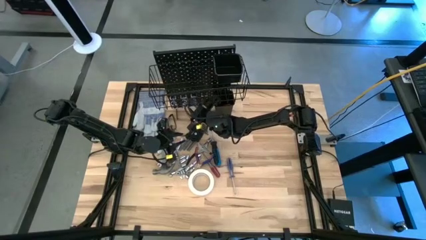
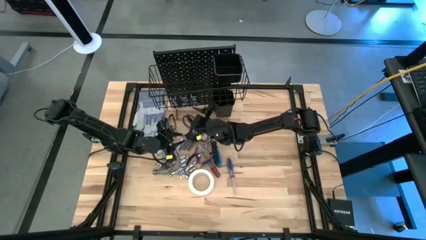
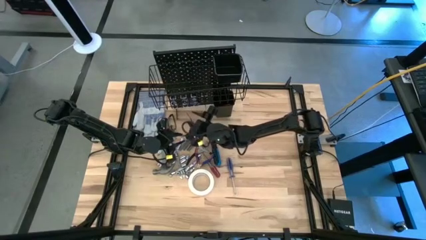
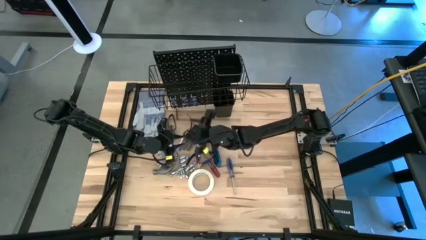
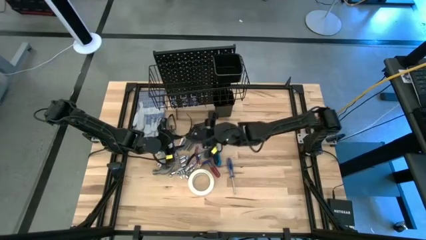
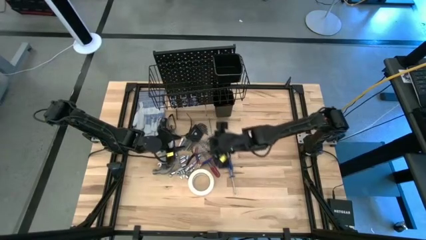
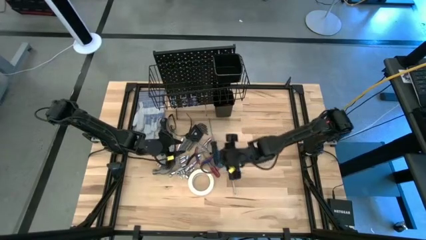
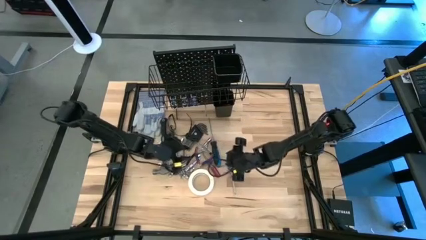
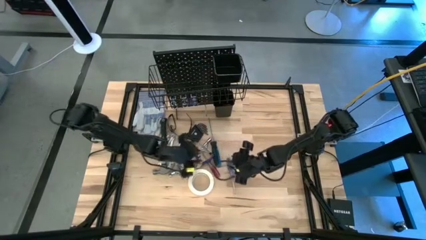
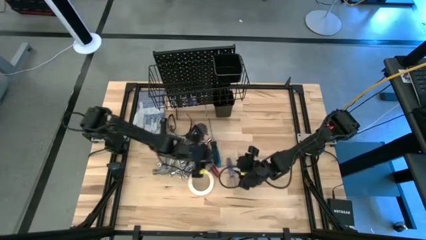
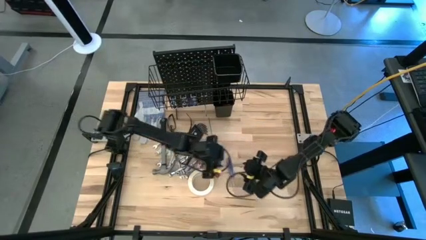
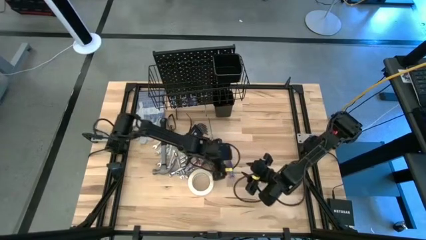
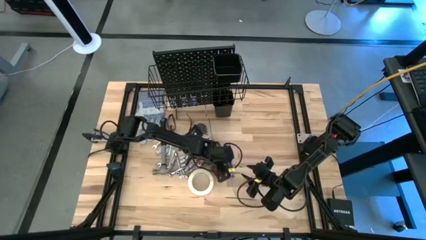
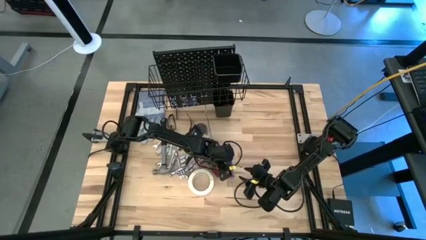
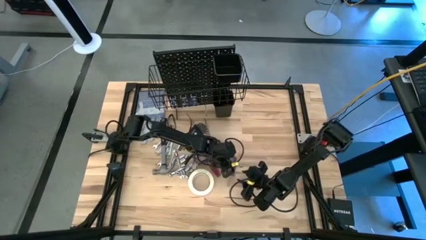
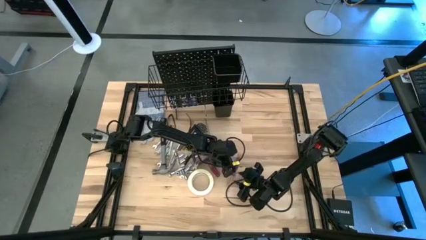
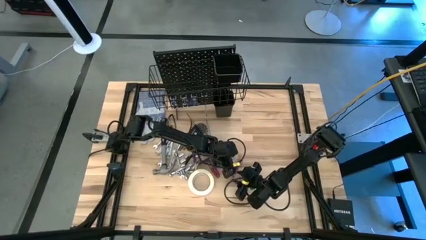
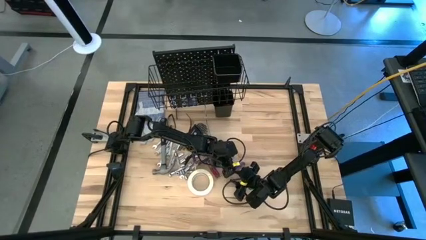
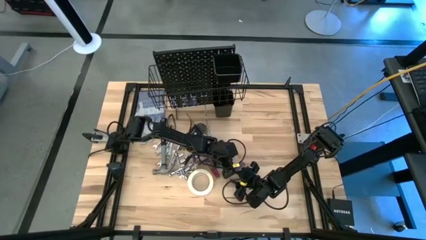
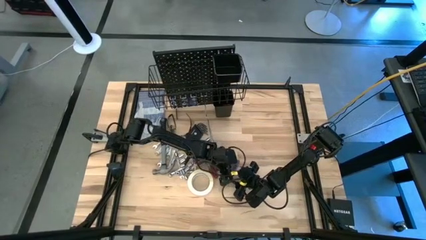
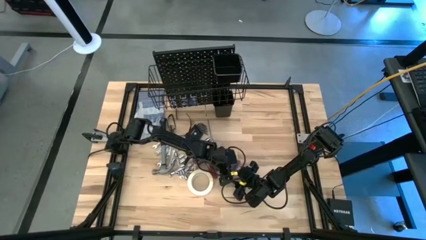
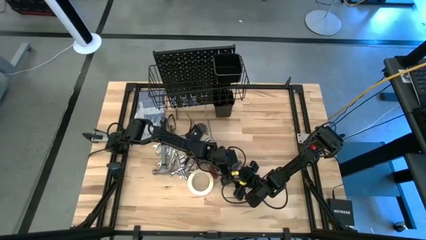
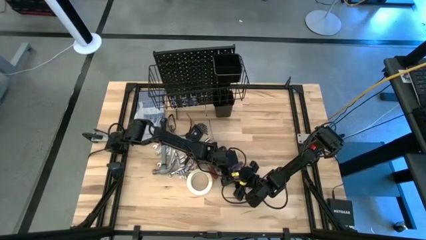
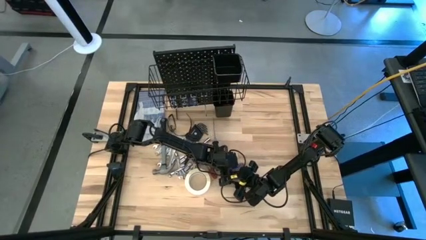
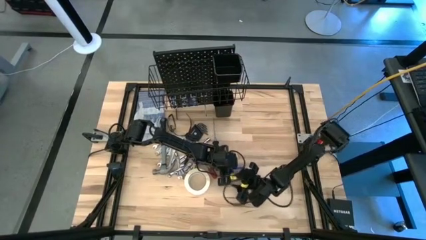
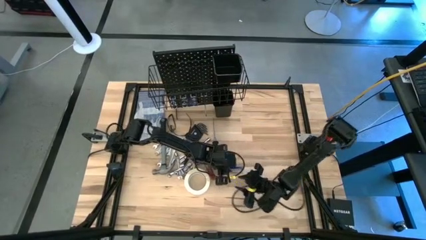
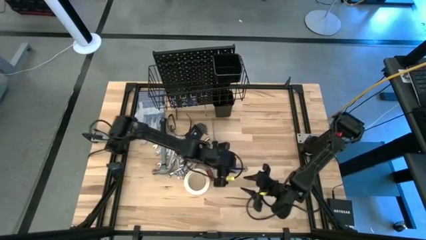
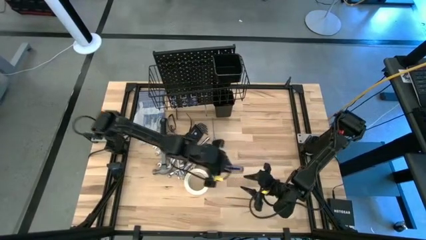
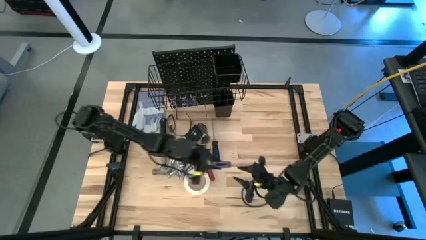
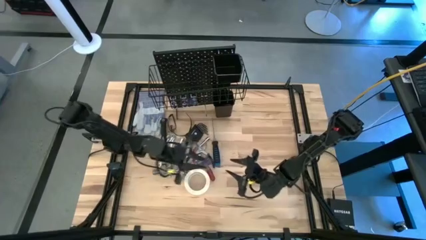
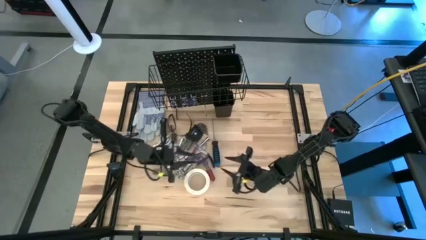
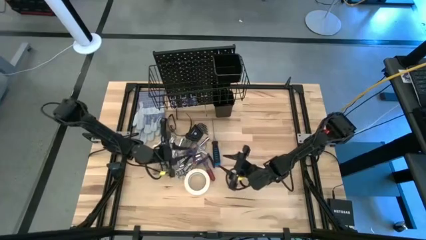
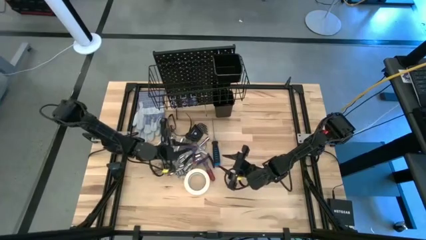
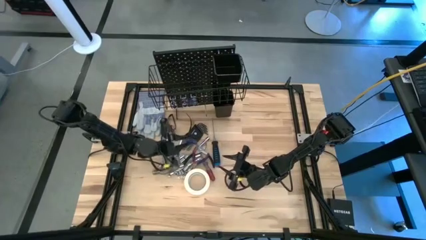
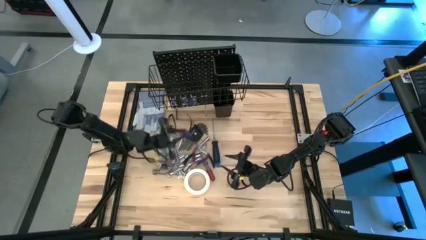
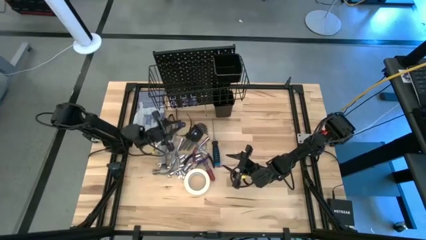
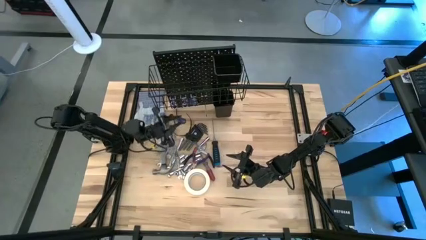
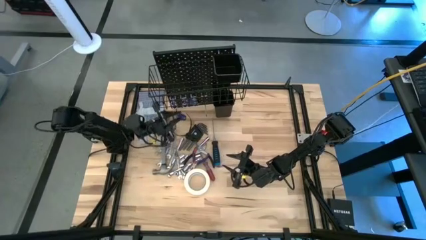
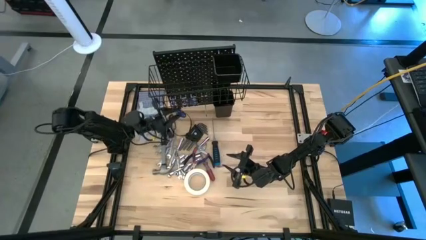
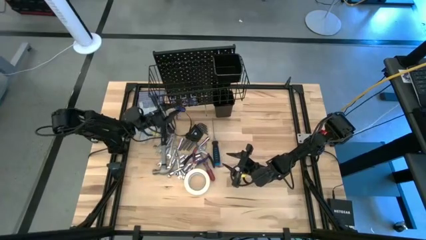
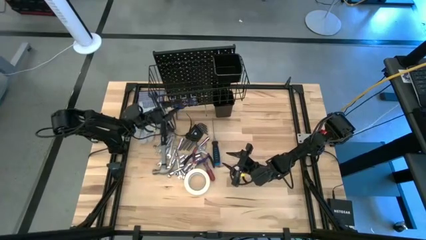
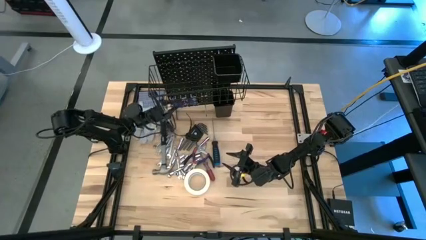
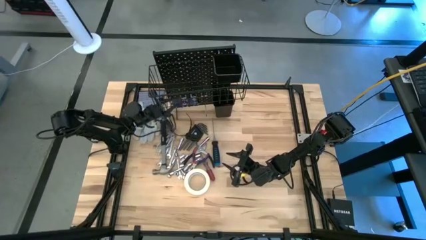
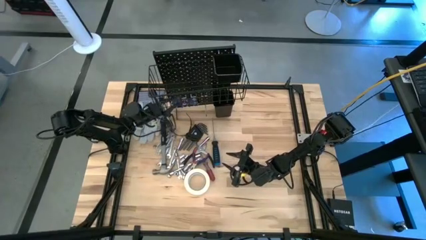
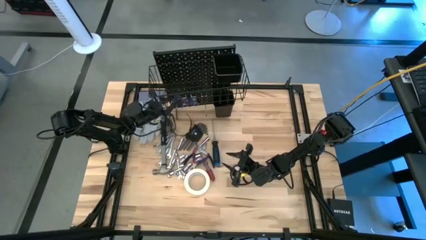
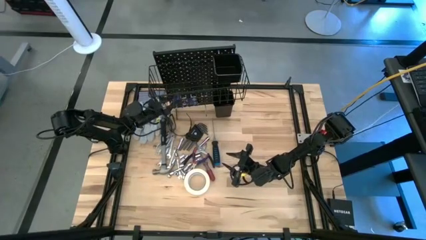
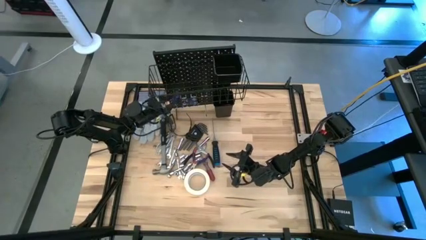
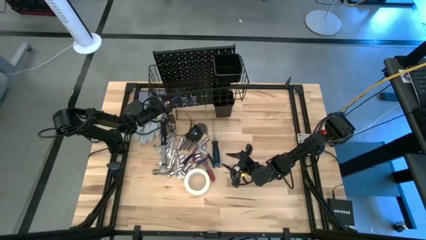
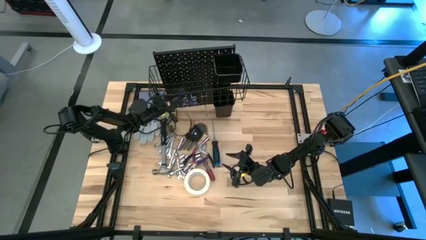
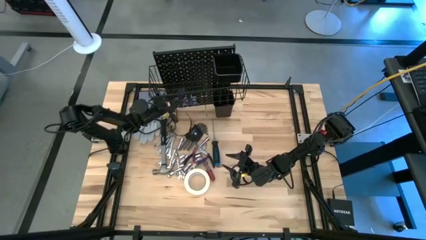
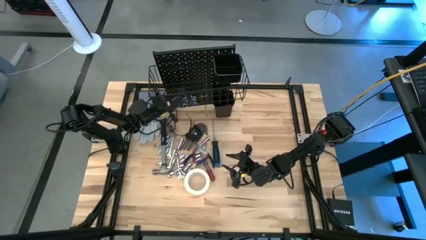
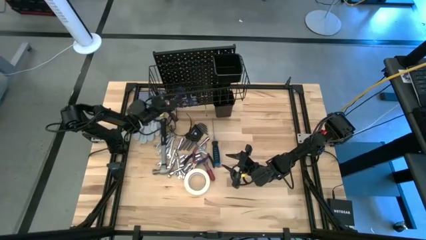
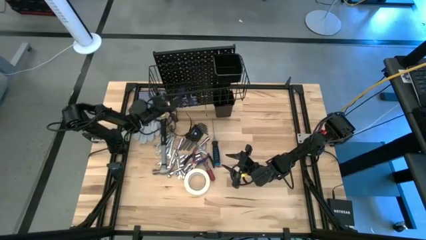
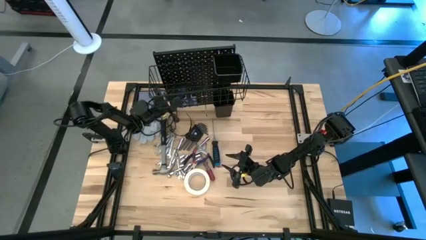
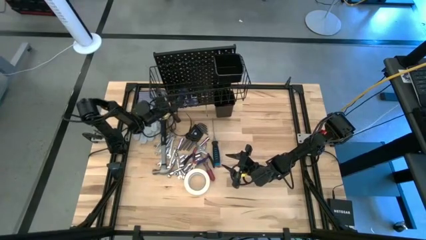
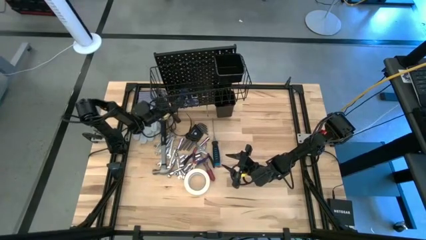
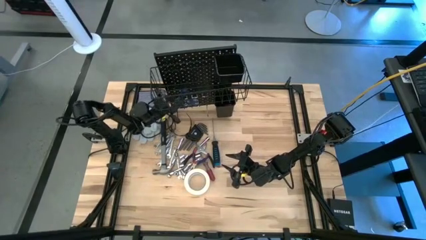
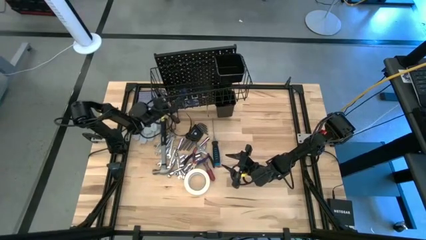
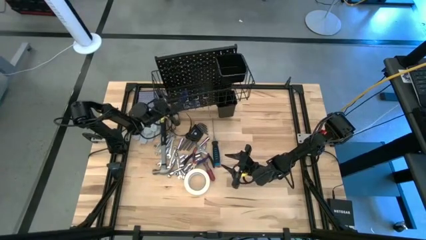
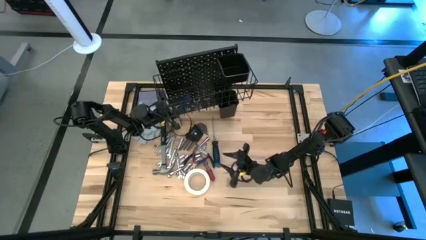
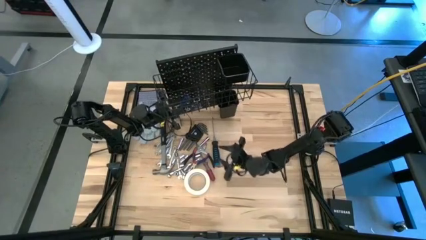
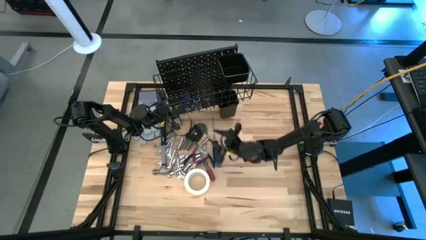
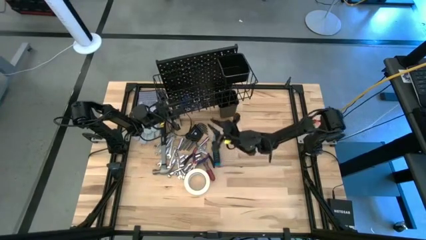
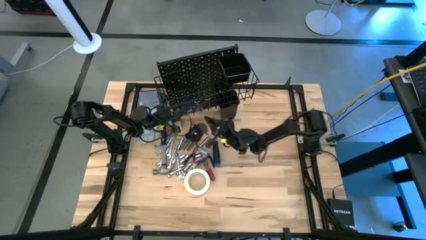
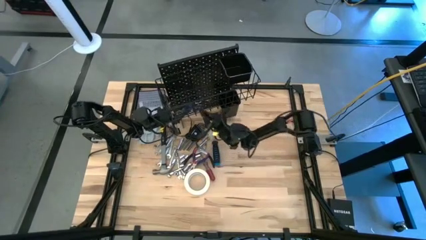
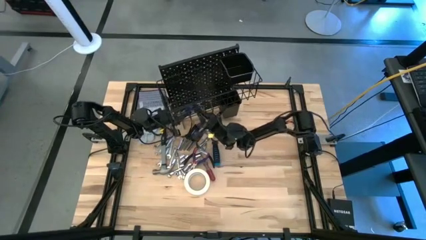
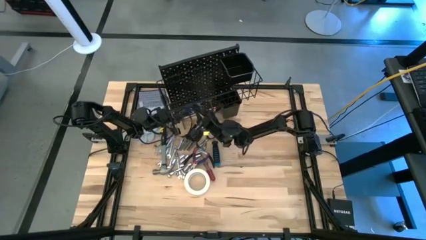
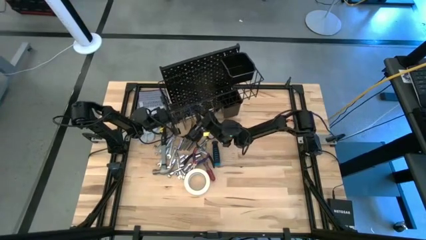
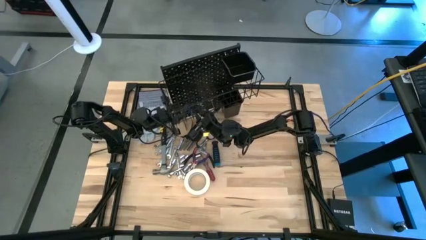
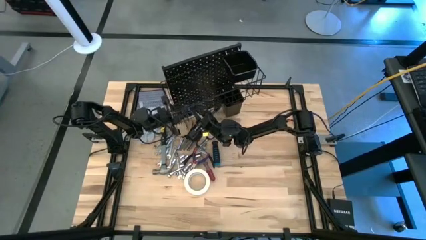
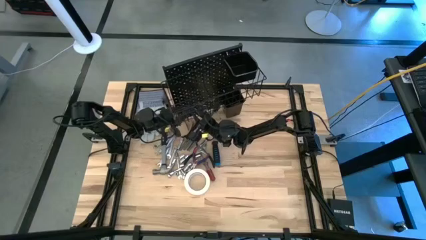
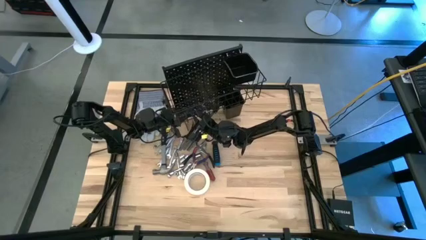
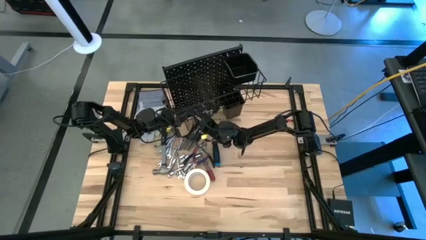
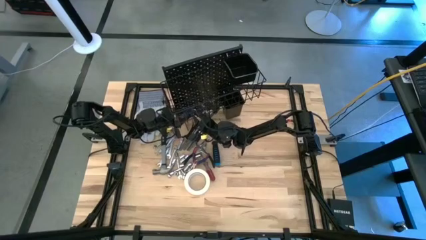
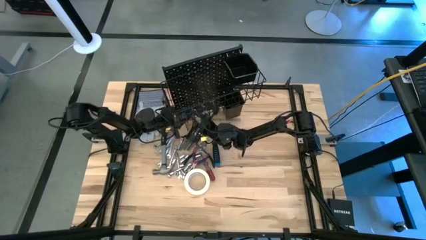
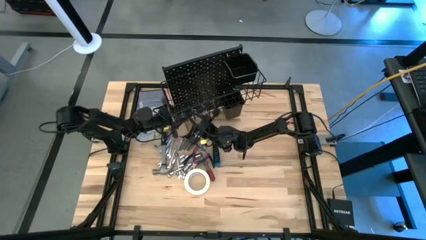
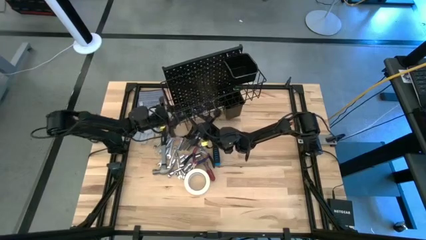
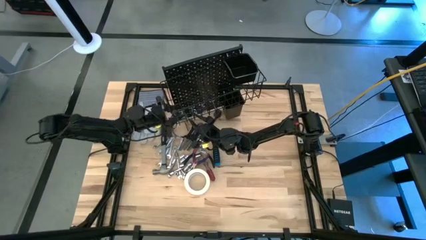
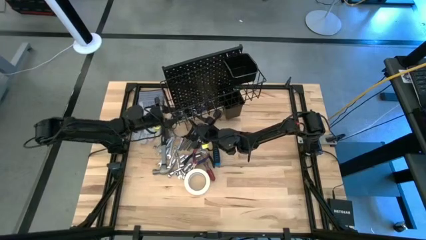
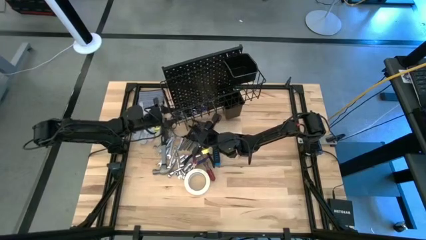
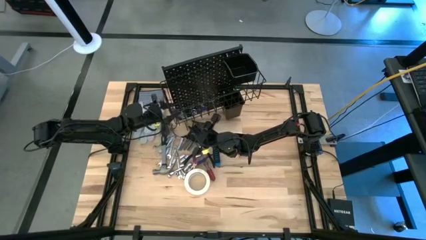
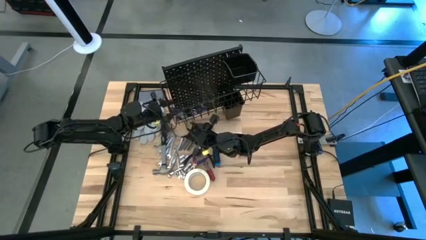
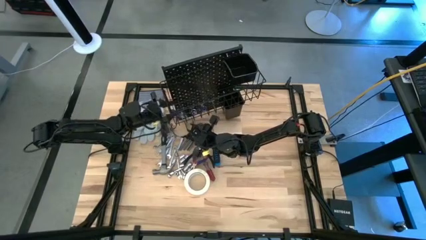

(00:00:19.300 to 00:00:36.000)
Task: Hang tools onto peg board
Hang the blue screwdriver on the pegboard

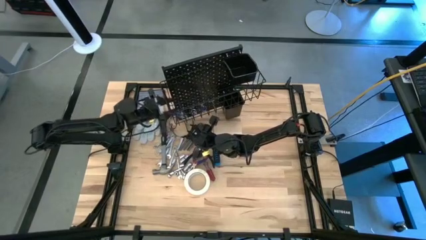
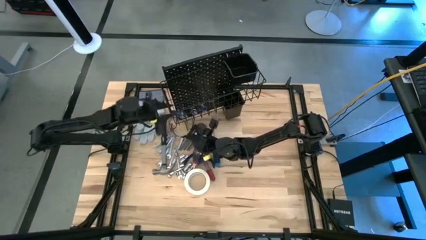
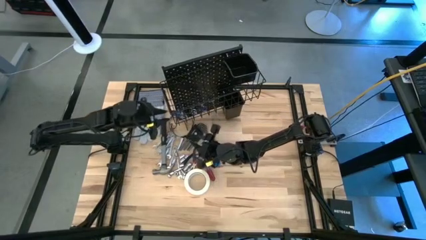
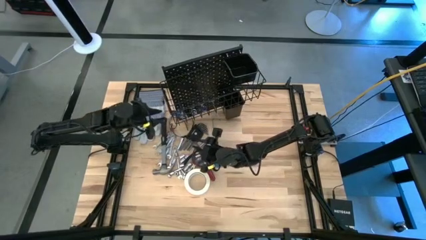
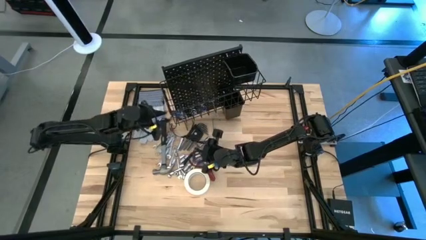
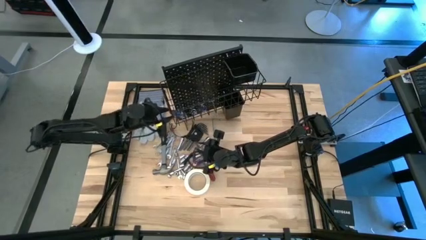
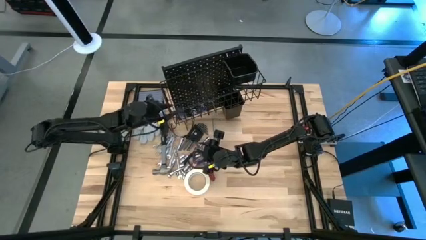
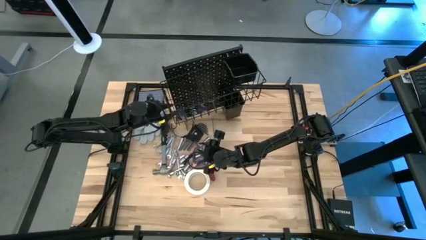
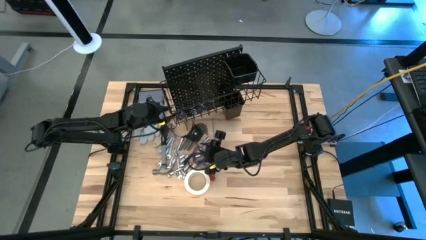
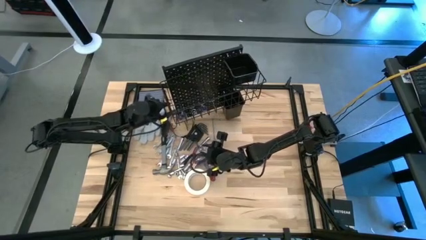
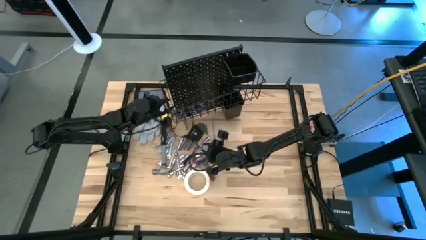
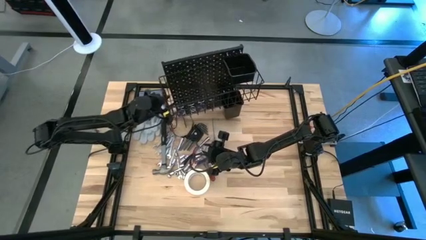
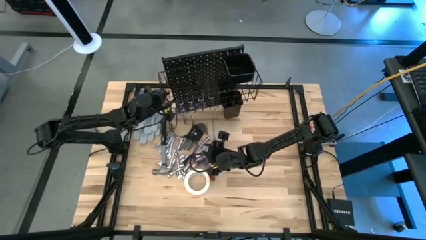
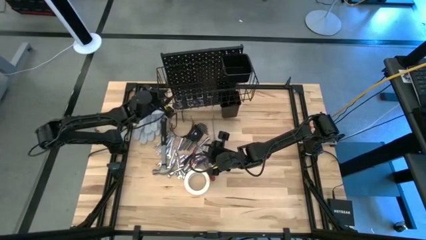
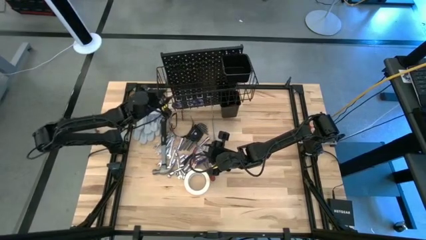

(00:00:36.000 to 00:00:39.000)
Adjust the pegboard
